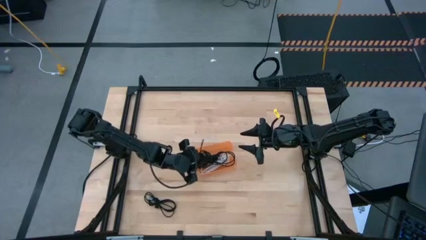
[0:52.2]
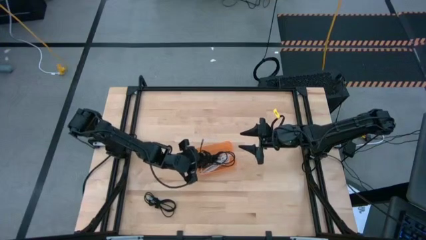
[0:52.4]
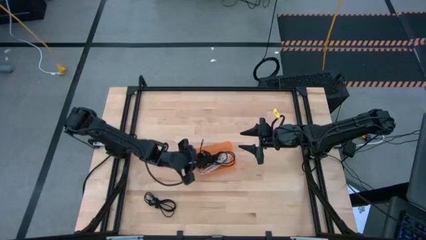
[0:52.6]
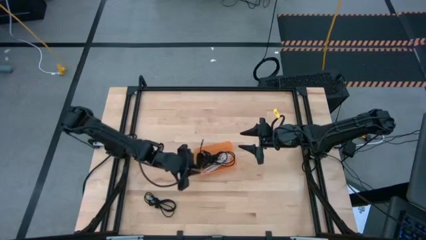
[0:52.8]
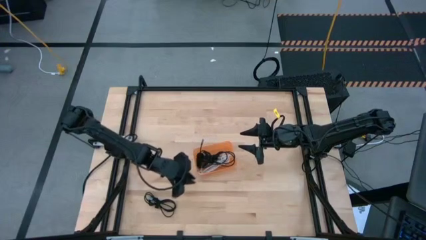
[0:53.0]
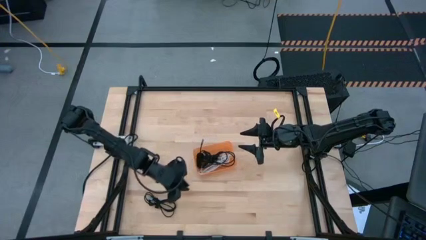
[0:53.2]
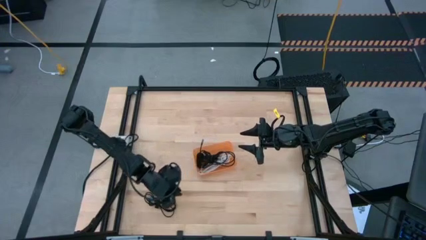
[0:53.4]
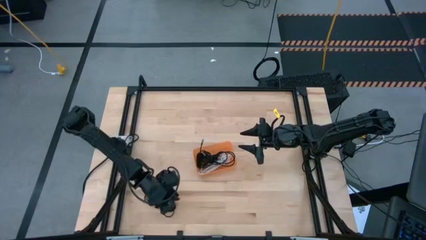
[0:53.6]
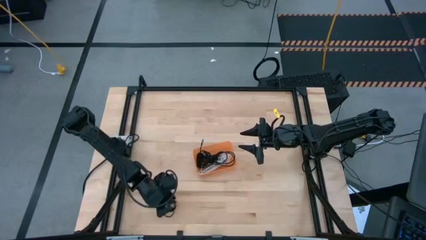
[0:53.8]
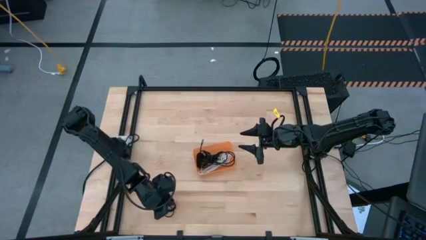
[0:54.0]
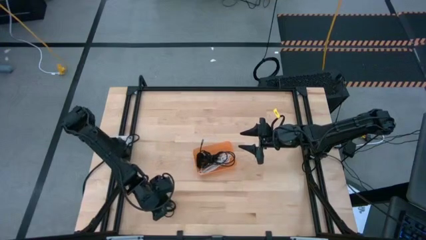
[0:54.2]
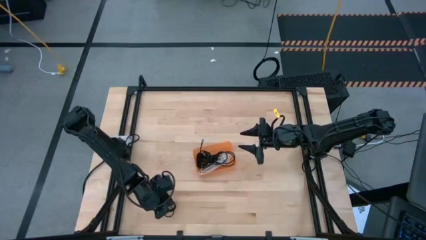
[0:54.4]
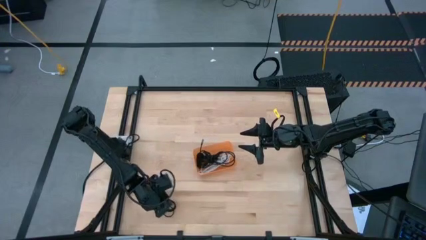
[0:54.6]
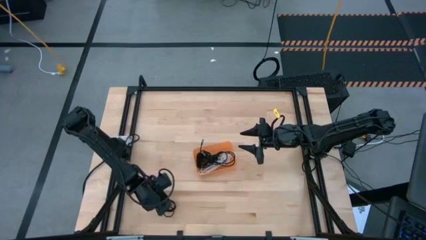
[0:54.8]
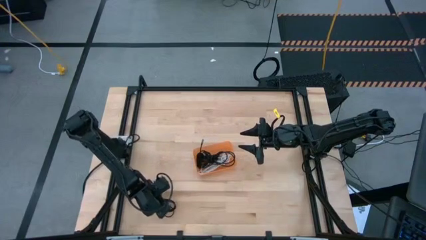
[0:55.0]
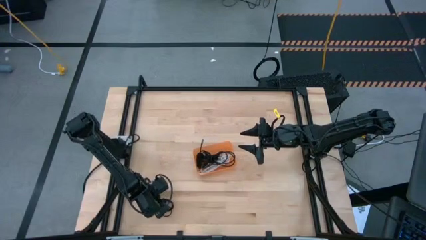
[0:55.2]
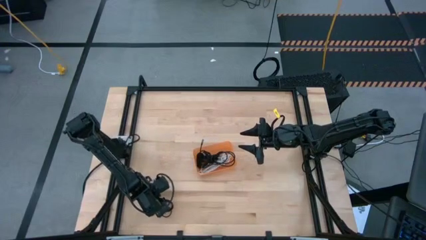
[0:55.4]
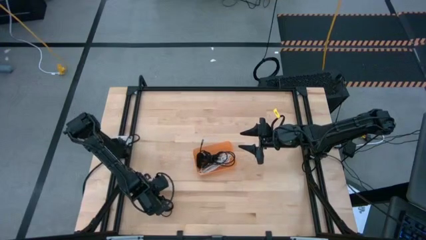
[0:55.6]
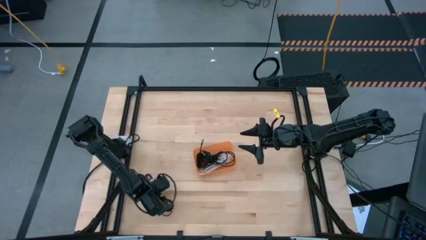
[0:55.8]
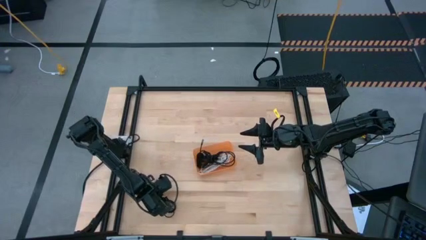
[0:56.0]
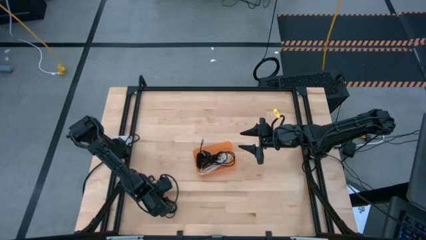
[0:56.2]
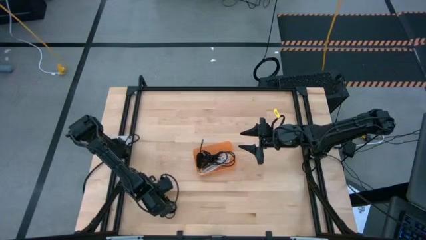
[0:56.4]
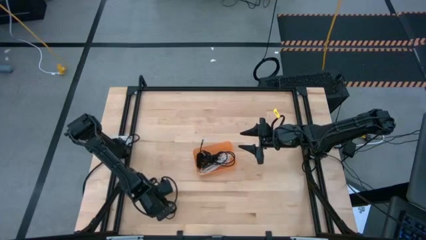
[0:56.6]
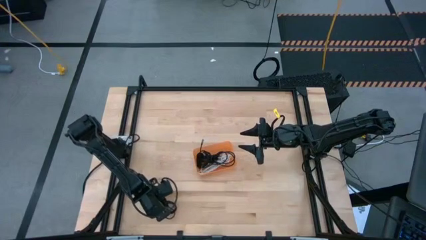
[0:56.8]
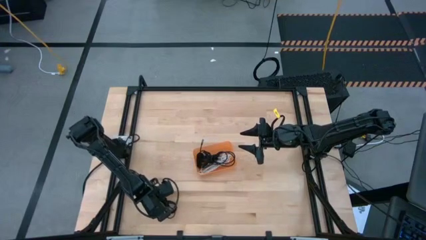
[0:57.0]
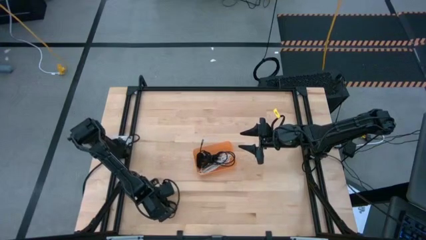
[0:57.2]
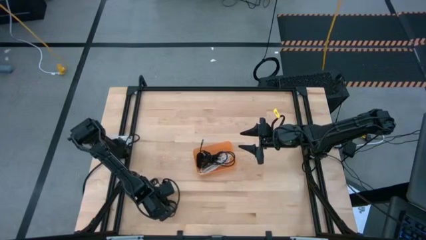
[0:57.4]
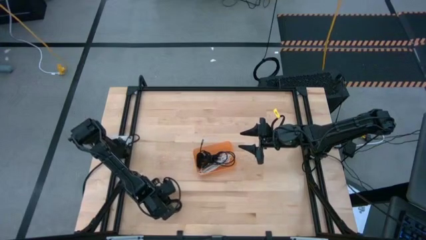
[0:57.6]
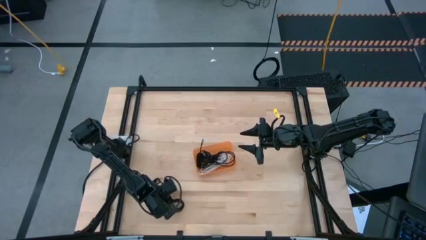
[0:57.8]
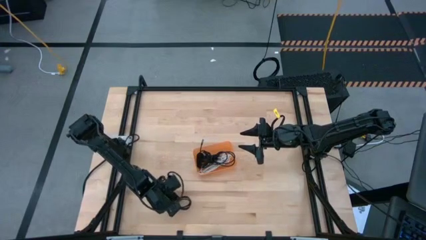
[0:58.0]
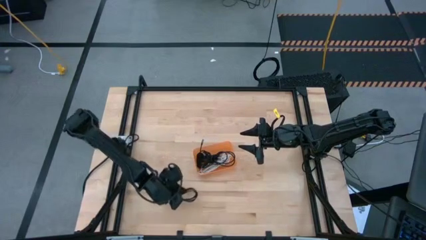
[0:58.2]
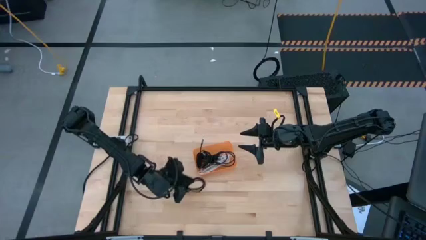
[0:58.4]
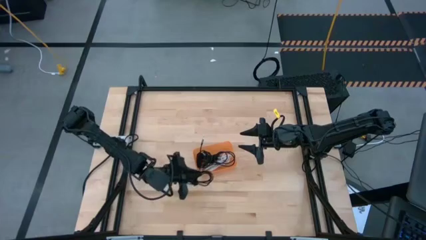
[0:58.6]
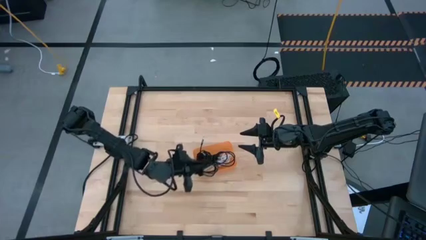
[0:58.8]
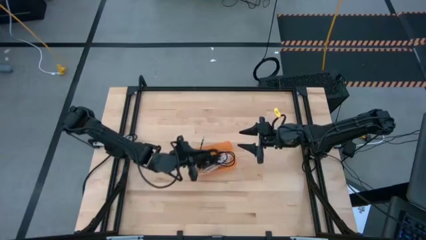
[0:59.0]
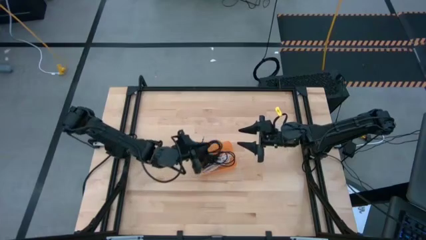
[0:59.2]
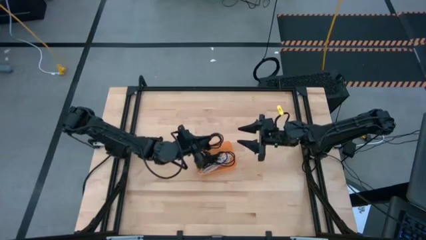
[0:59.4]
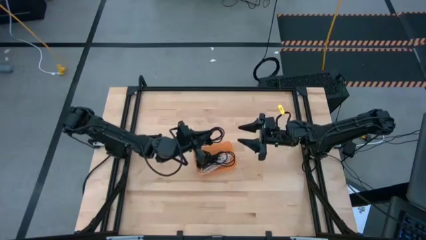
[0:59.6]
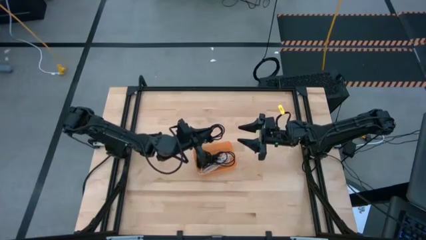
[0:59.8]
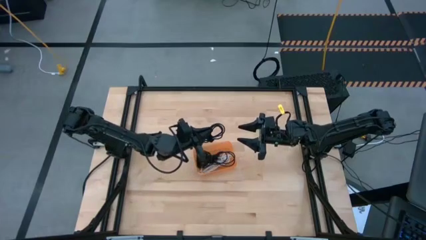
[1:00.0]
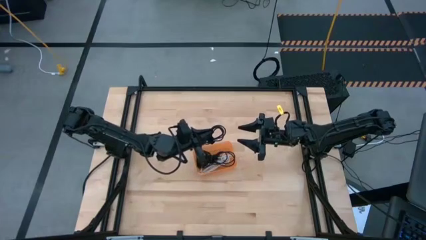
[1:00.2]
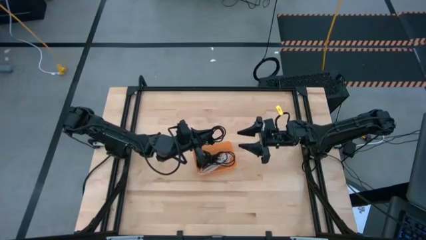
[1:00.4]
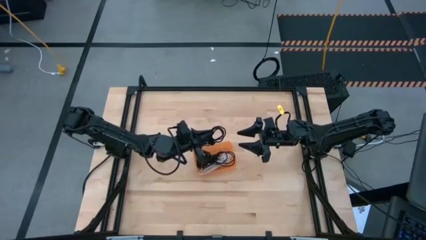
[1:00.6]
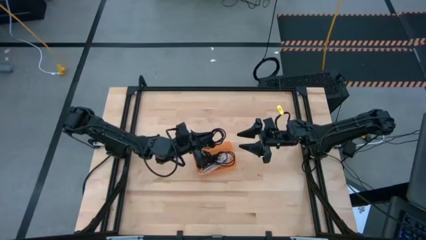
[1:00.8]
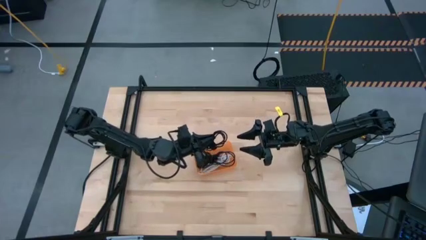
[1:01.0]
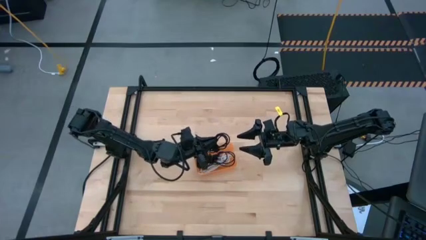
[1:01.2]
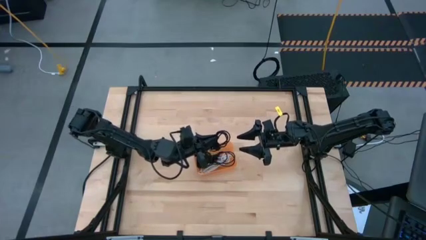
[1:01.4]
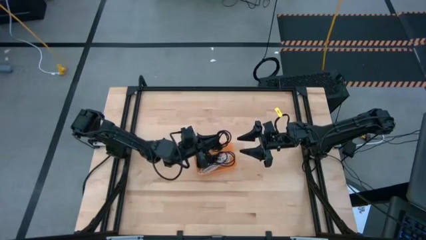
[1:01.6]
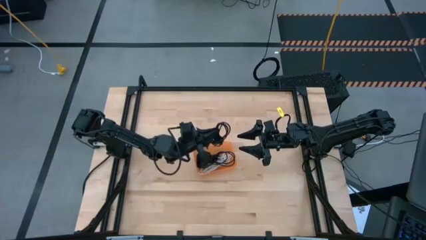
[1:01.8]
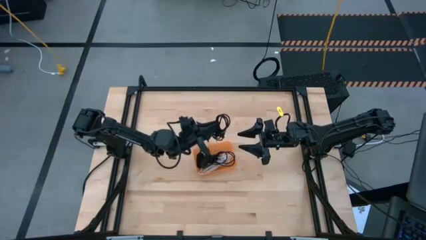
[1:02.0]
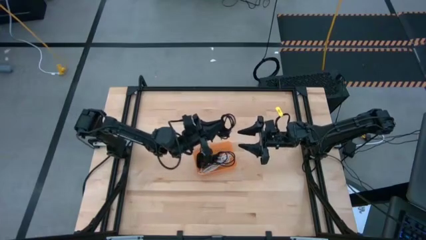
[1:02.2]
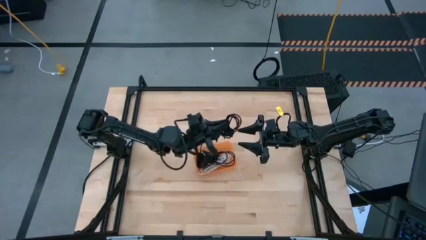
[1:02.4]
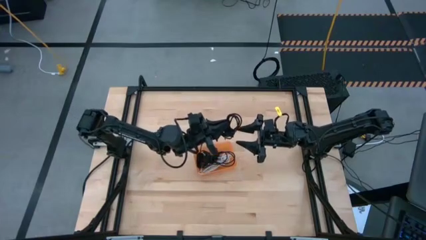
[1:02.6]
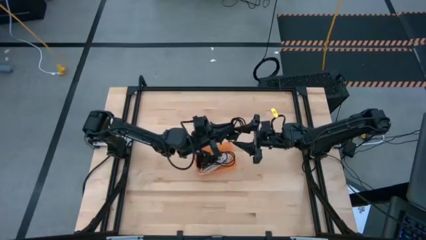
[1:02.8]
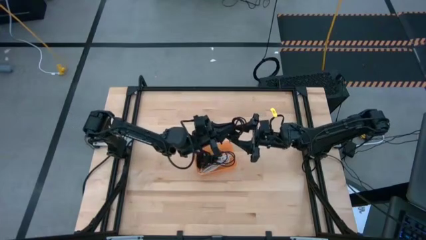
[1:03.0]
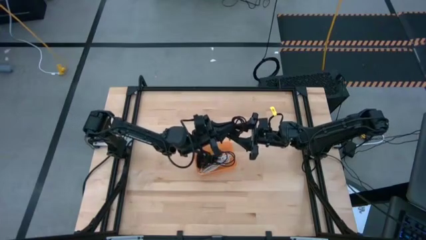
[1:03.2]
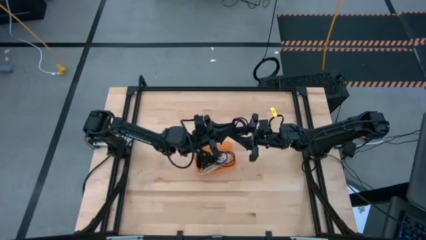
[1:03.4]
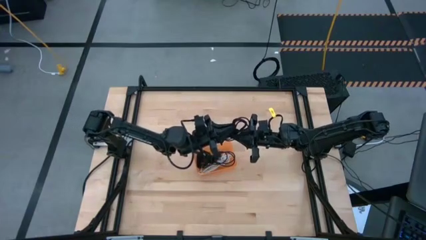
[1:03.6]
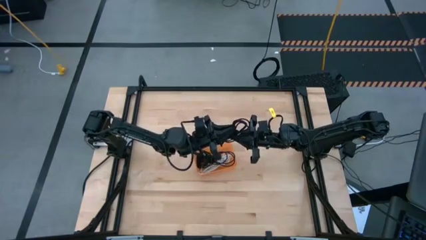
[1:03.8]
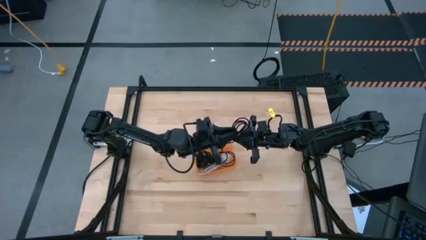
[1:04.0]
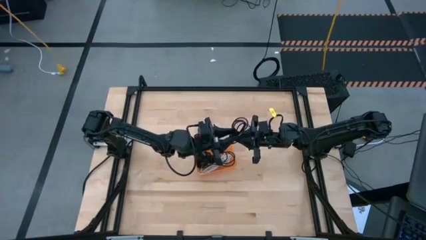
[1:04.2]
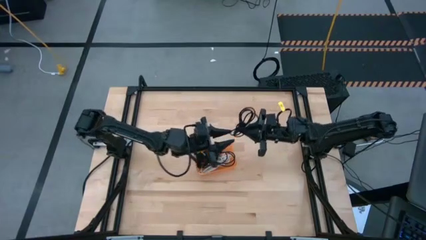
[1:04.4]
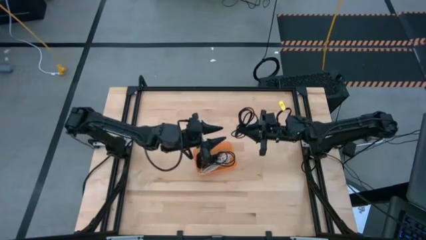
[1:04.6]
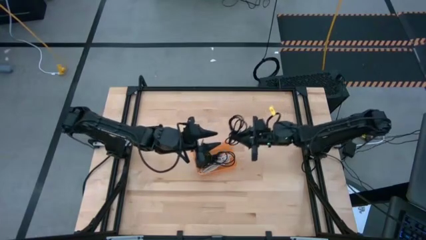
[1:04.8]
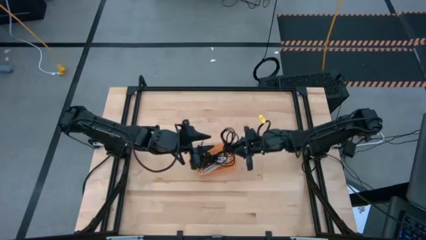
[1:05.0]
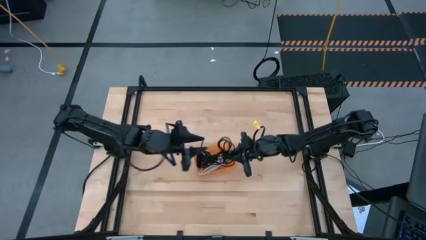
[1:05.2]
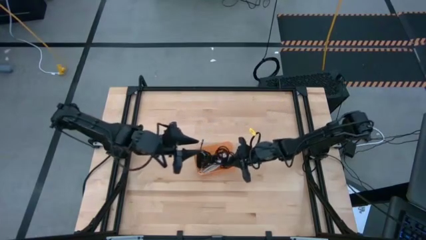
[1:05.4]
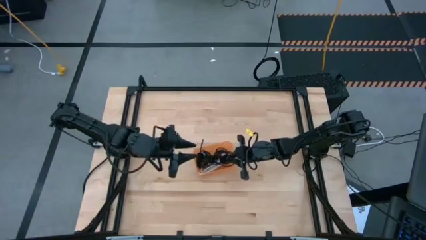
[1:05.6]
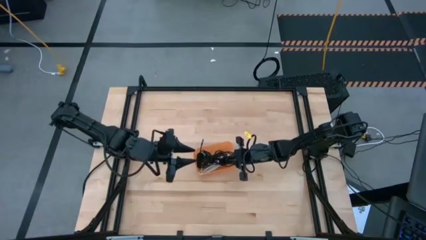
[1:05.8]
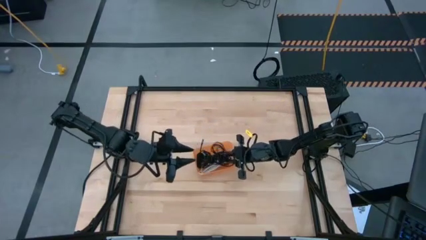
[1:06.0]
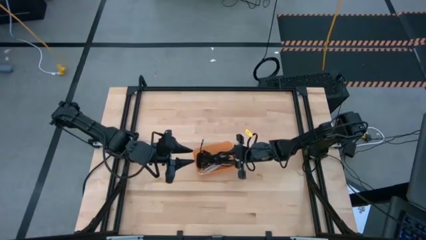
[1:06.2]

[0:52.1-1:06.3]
Task: Pick and place USB-C Cables
Put the black charger cable into the orange bin
